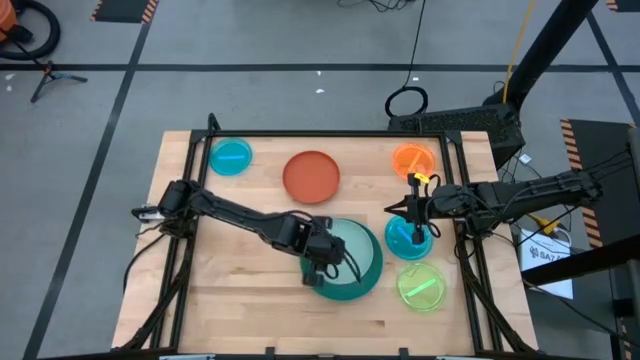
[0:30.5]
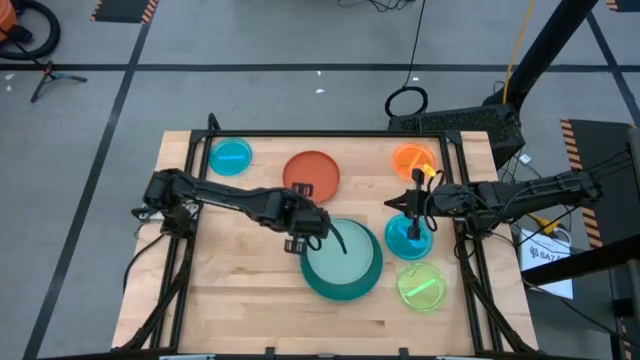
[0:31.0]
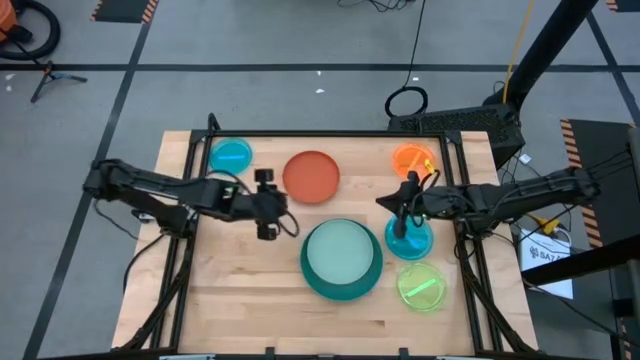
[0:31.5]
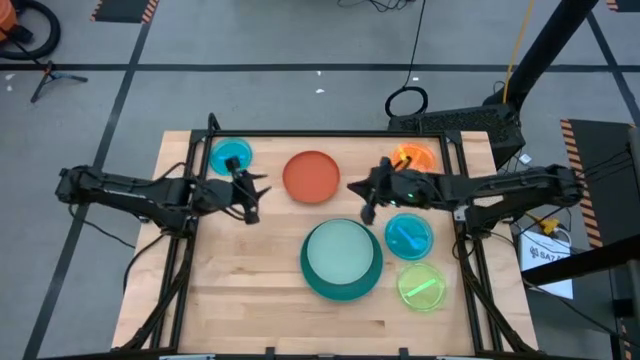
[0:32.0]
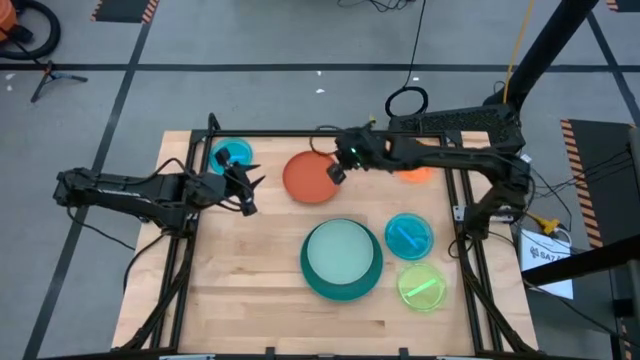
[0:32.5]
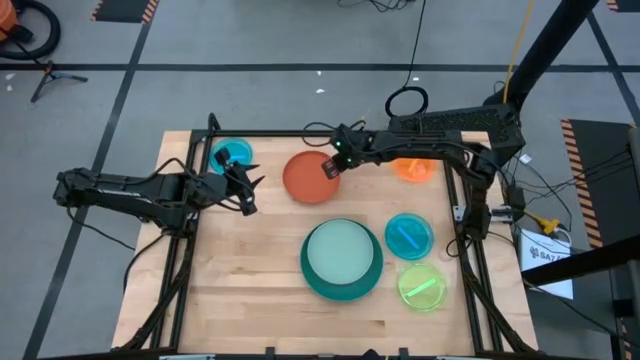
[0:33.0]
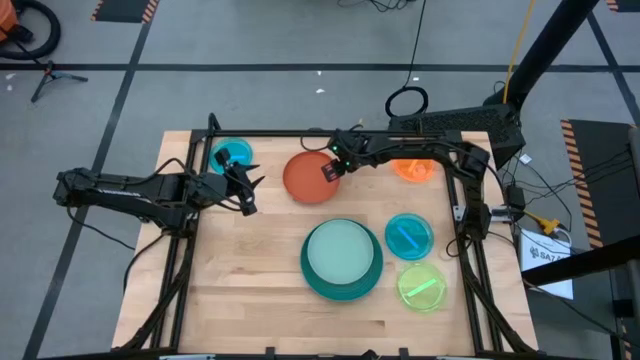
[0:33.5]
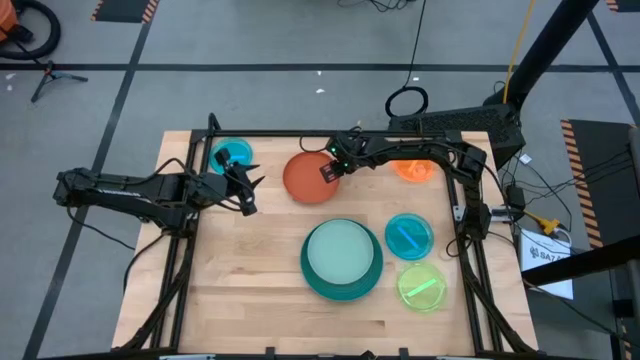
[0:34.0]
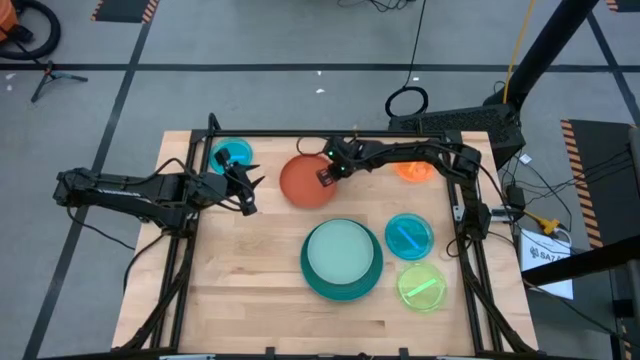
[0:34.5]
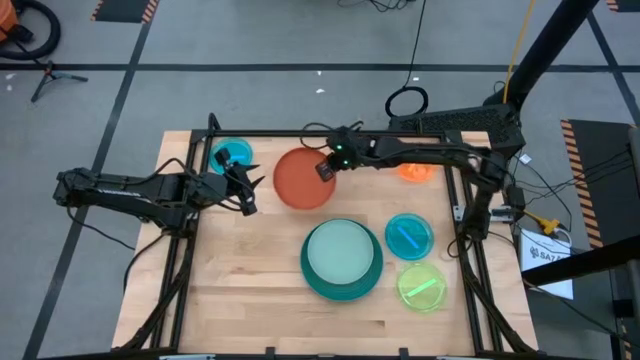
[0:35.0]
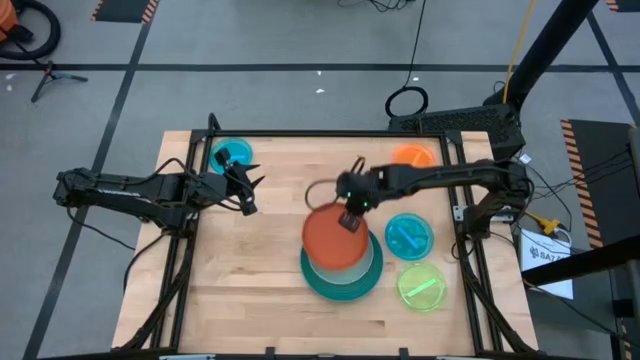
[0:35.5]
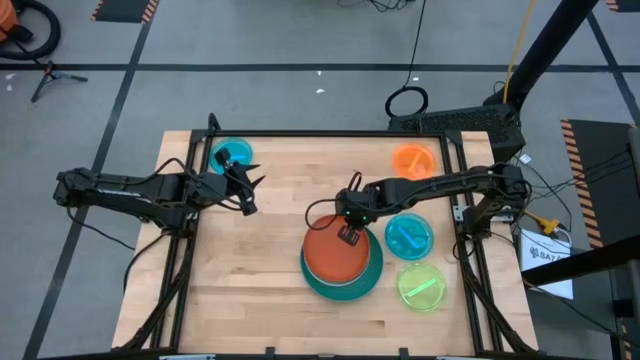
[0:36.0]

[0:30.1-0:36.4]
Task: Stack plastic plates
Stack the orange plate on the light green plate

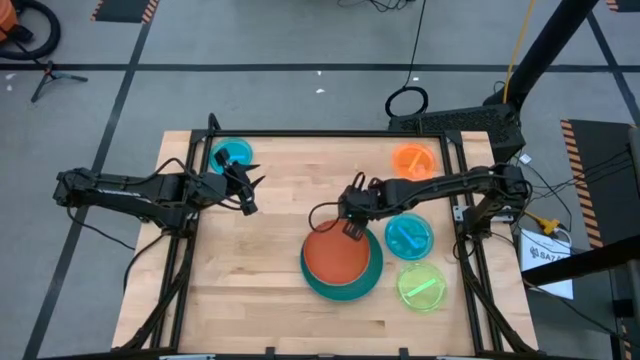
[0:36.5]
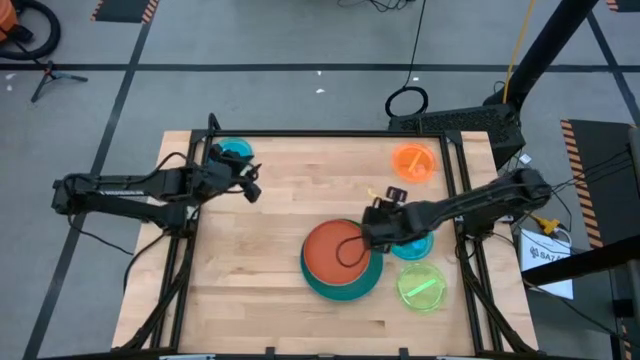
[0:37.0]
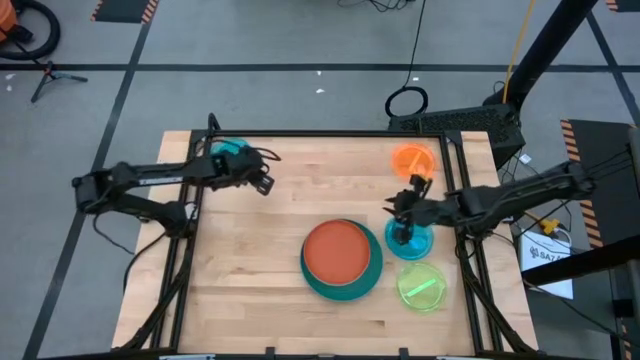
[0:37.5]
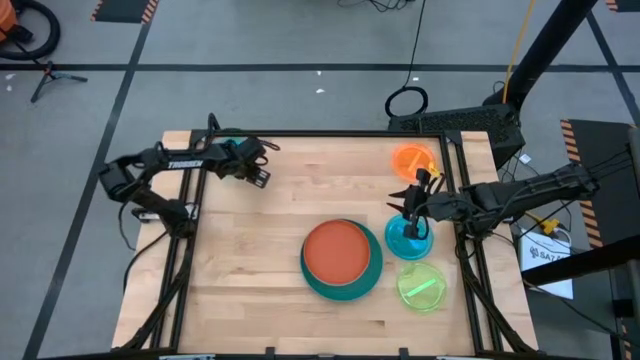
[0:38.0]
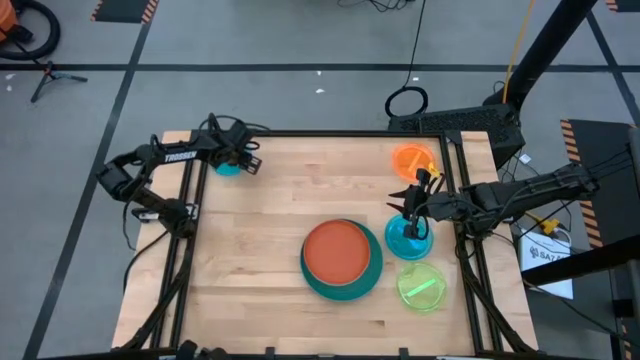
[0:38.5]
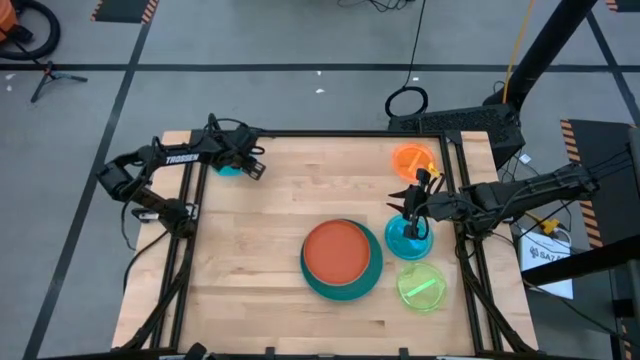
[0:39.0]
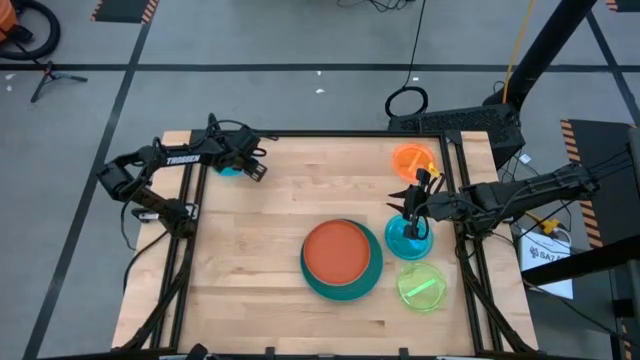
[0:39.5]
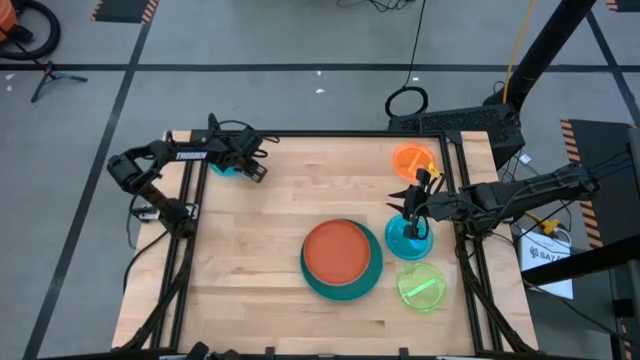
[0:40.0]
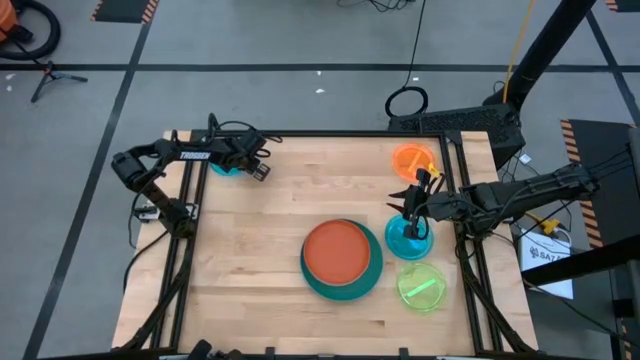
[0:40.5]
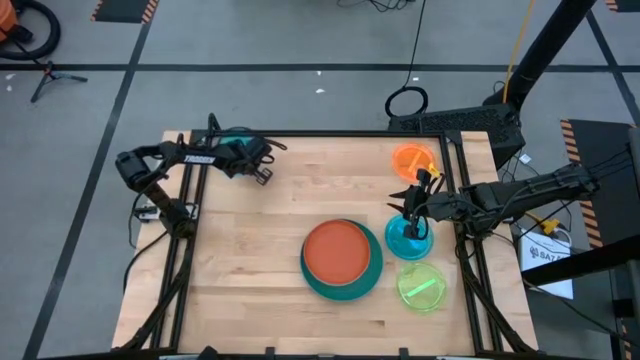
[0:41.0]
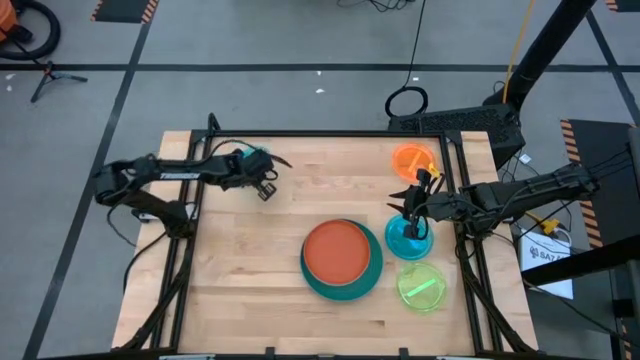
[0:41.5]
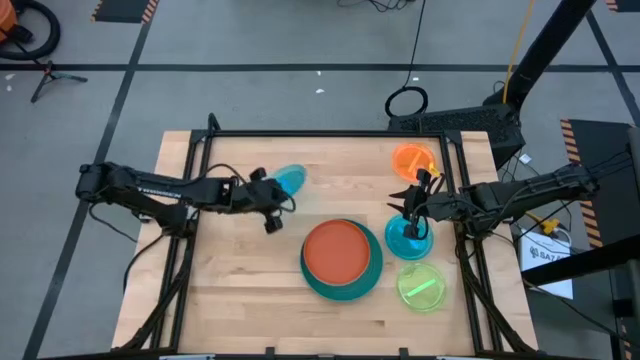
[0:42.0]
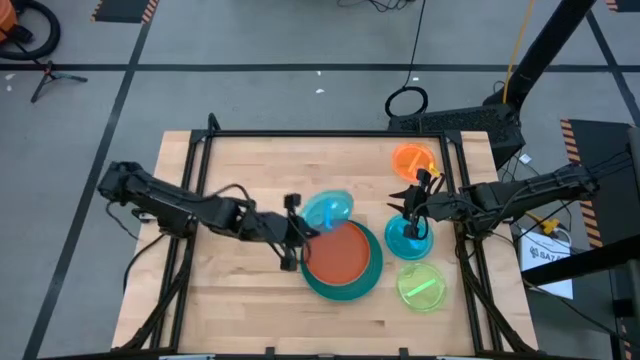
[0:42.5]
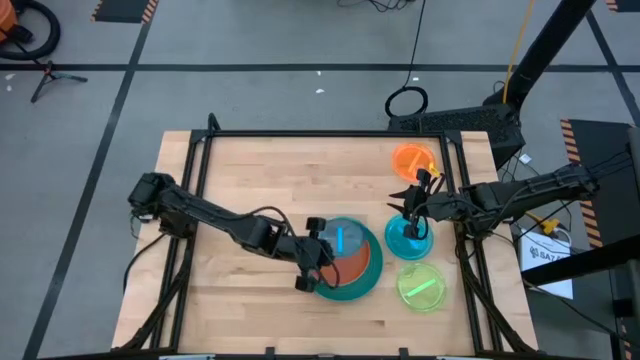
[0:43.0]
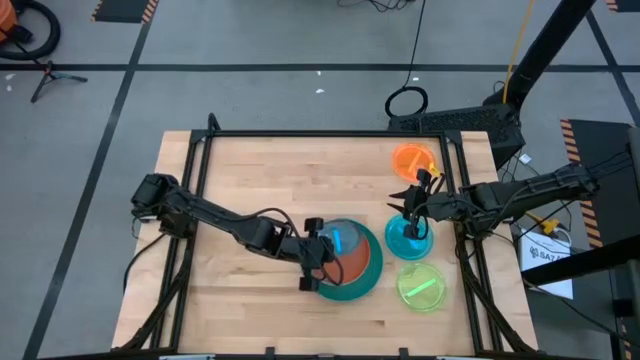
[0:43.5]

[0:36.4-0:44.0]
Stack the left transparent blue plate on the orange plate

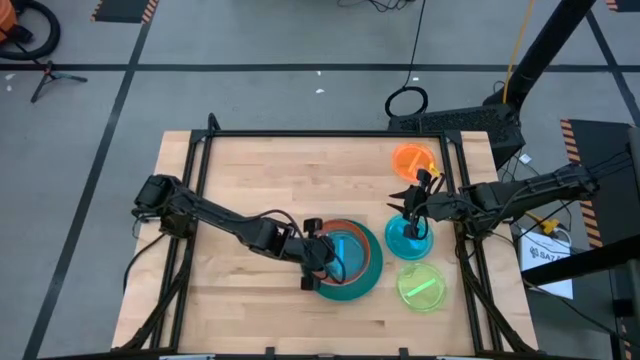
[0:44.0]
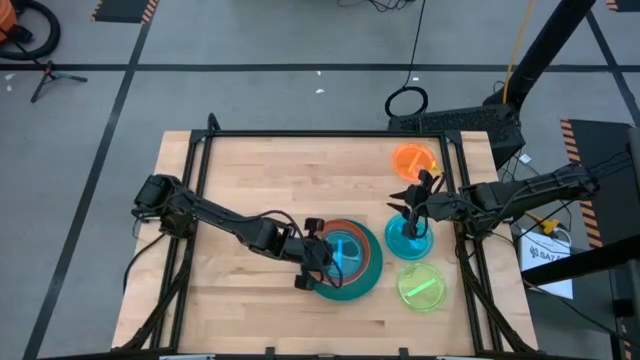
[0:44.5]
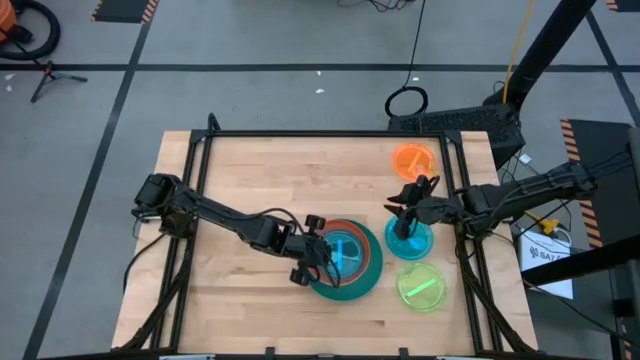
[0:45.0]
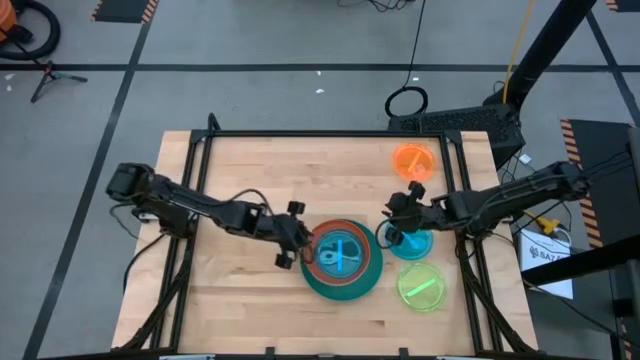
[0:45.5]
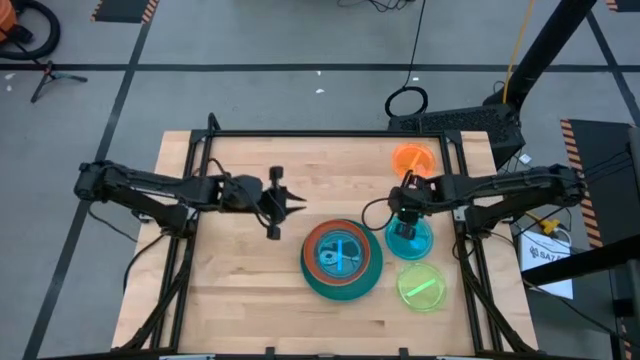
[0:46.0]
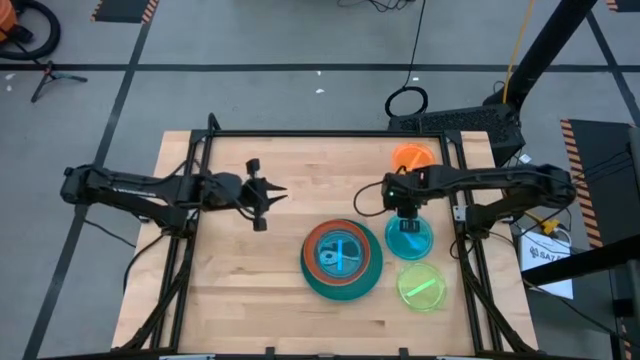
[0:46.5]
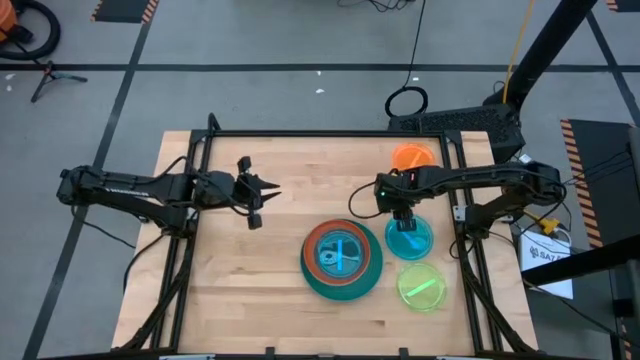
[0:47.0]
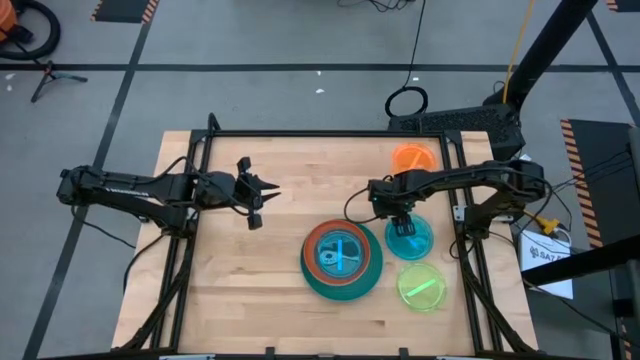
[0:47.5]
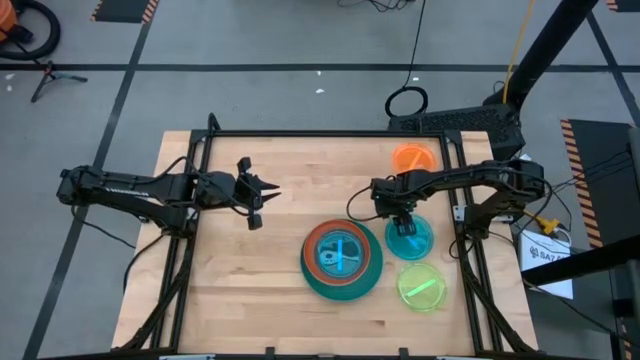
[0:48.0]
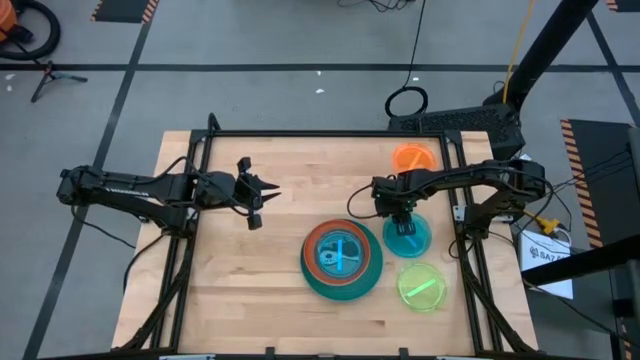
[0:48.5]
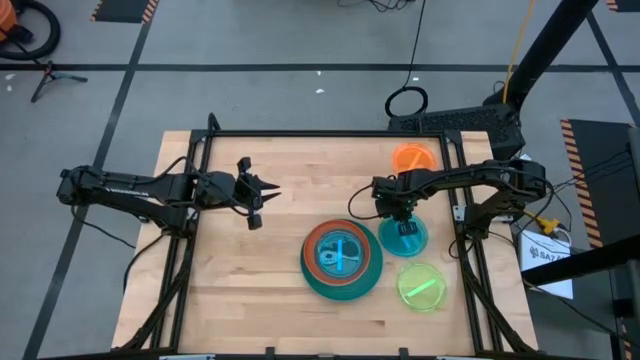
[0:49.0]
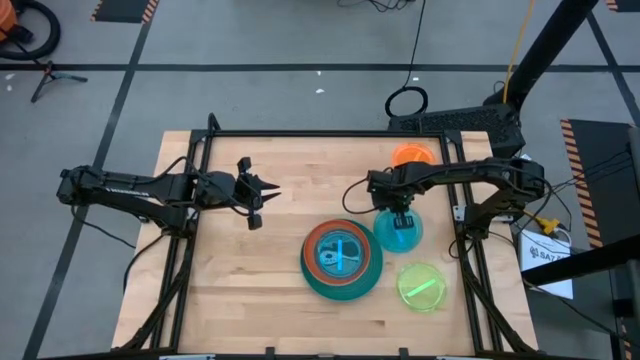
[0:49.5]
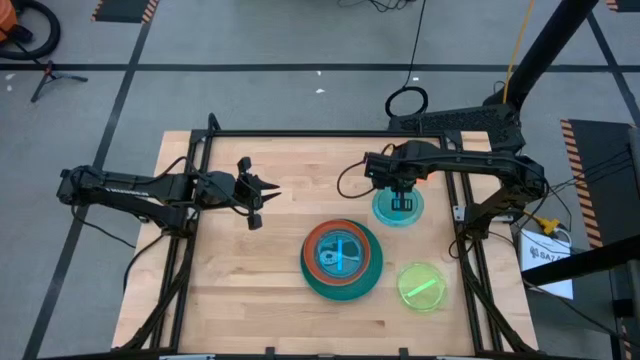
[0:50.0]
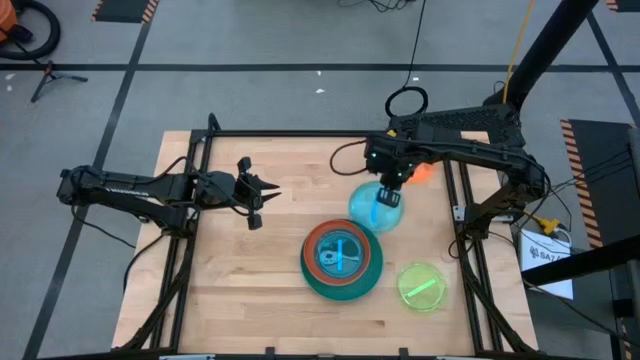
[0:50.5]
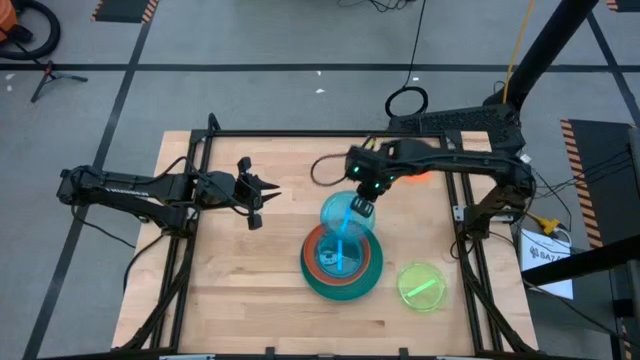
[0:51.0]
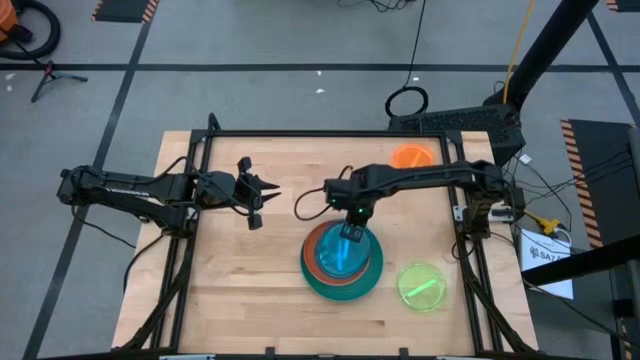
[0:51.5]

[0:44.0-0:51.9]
Stack the right transparent blue plate on the left transparent blue plate
